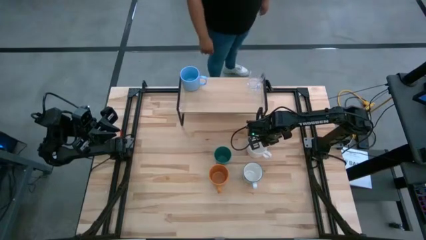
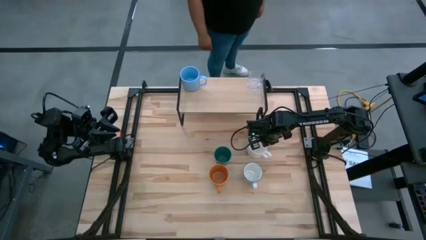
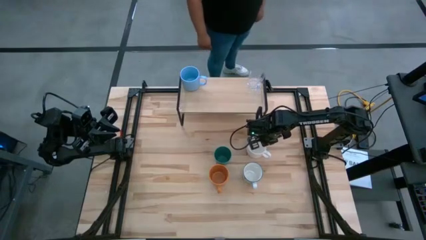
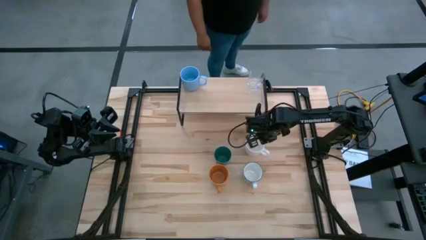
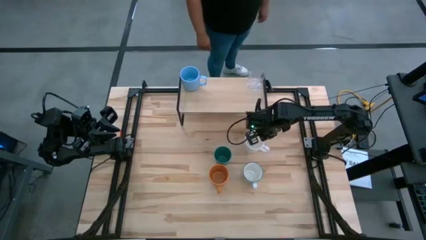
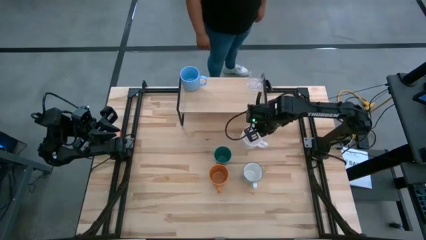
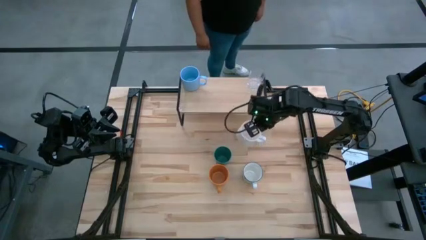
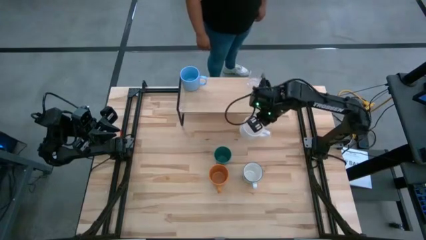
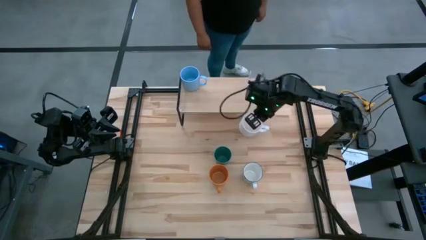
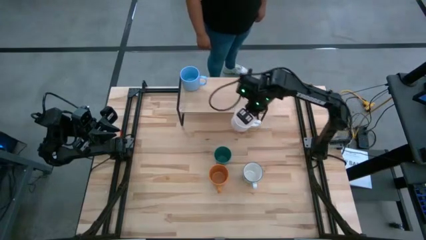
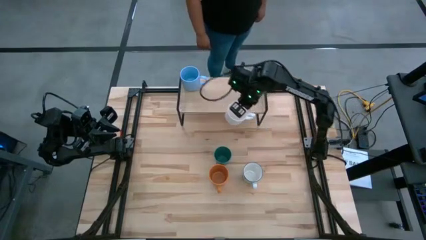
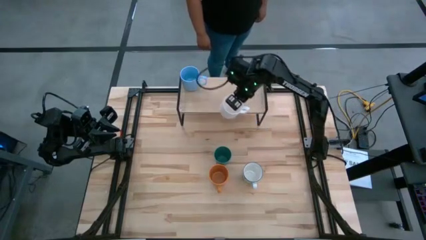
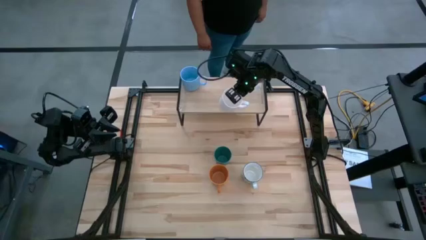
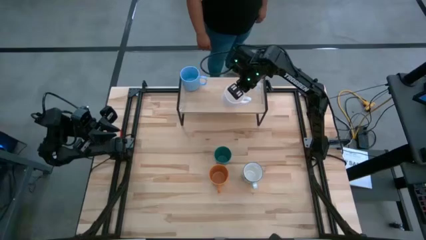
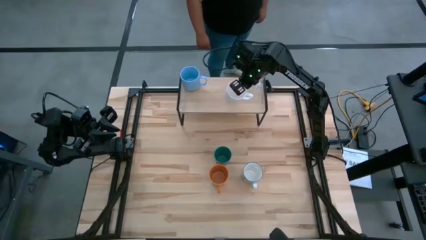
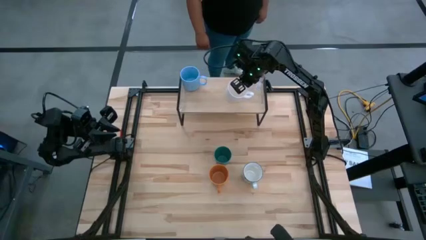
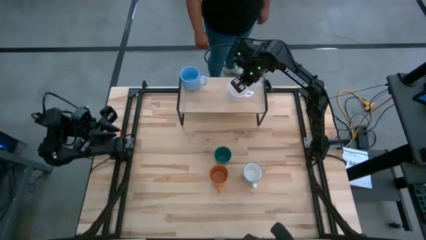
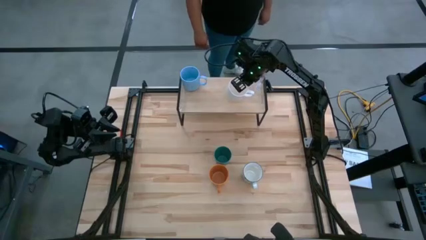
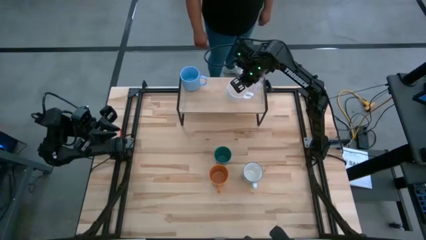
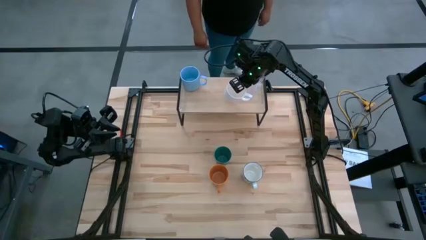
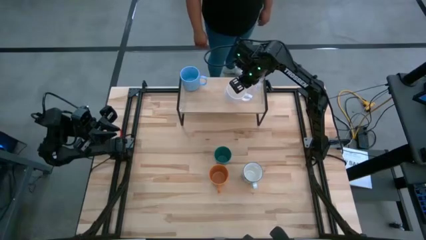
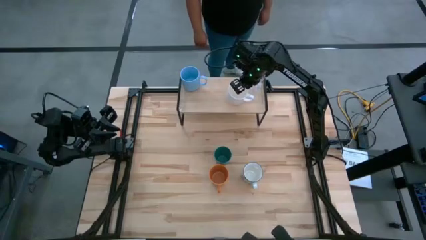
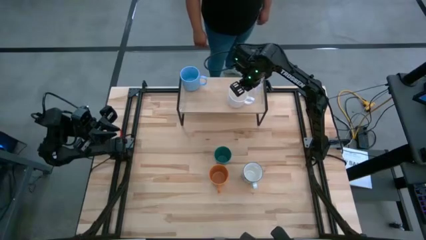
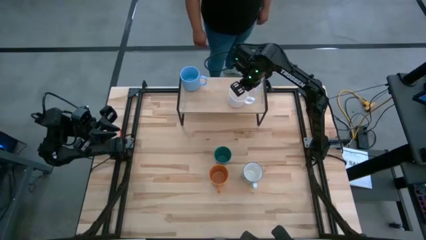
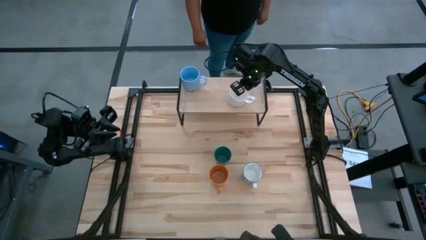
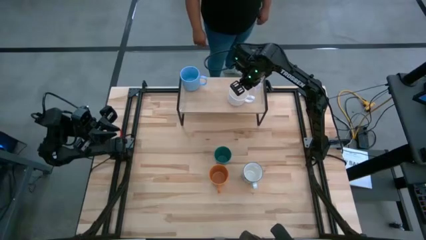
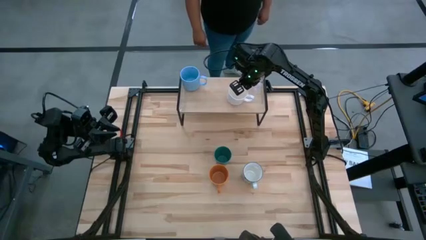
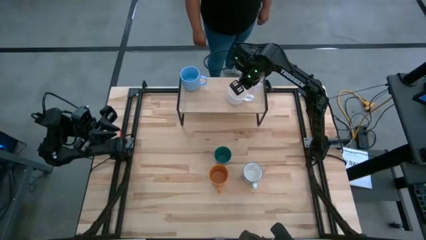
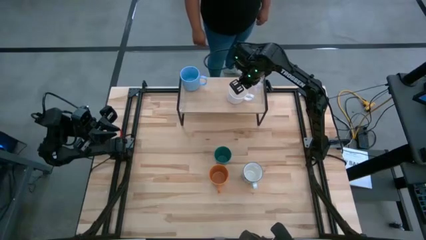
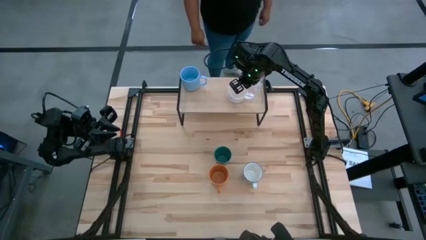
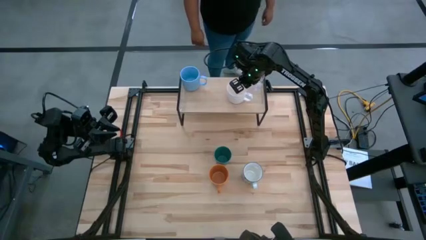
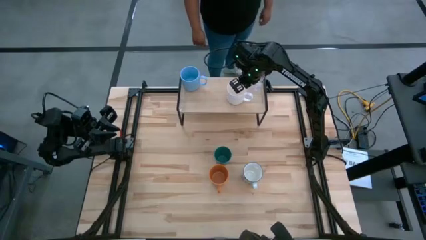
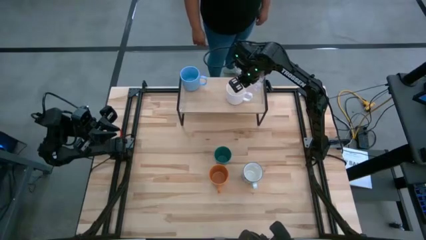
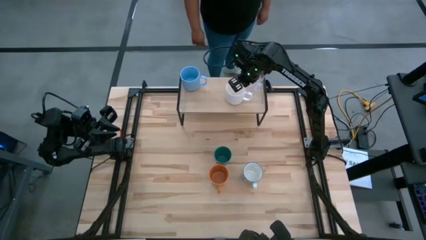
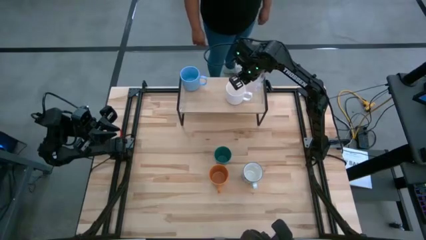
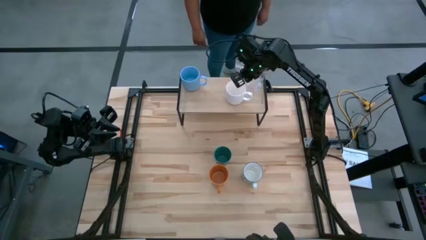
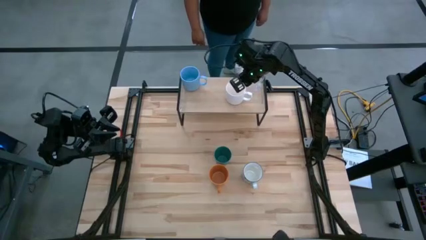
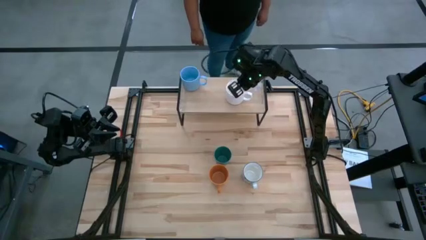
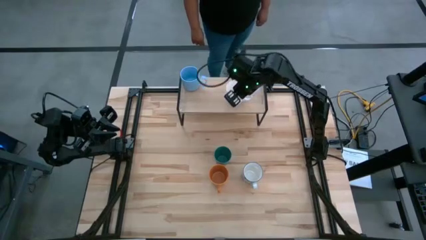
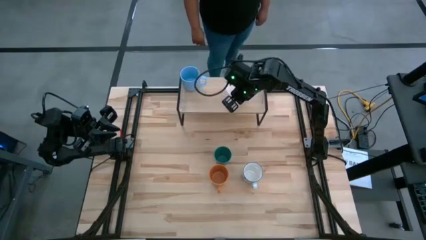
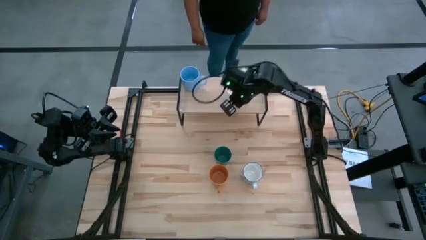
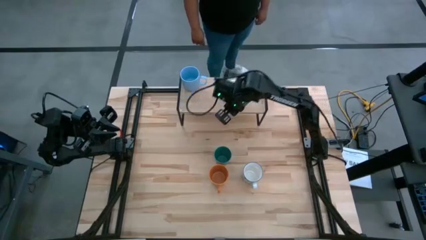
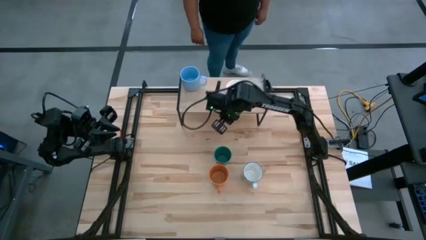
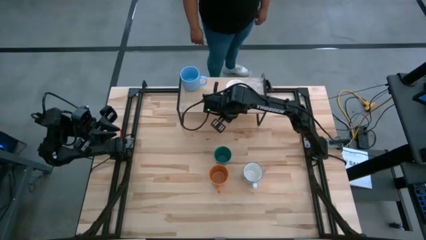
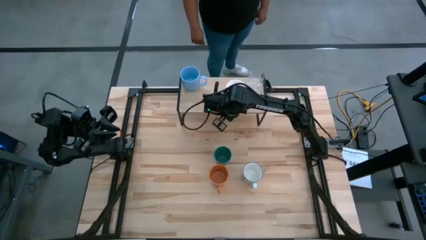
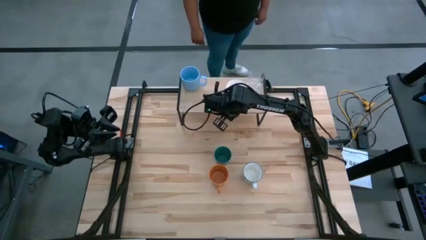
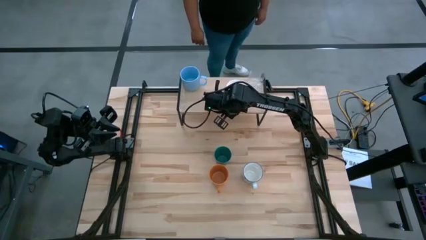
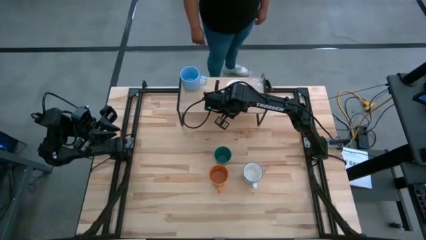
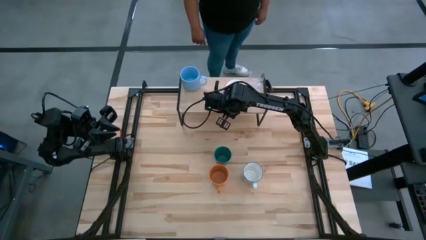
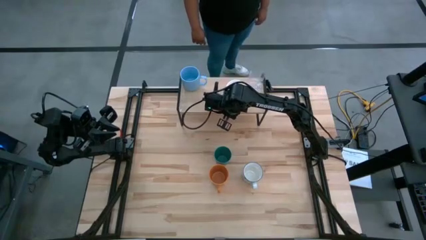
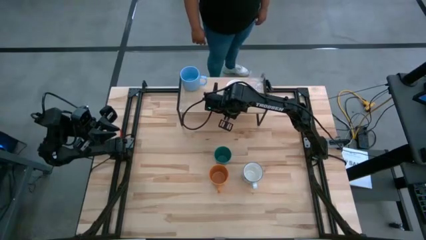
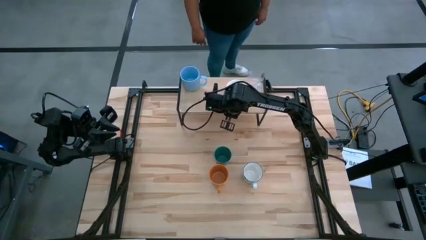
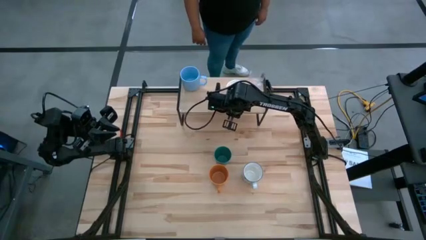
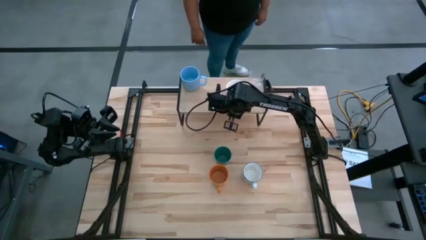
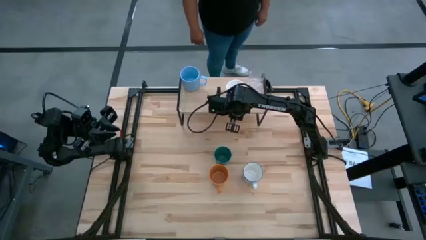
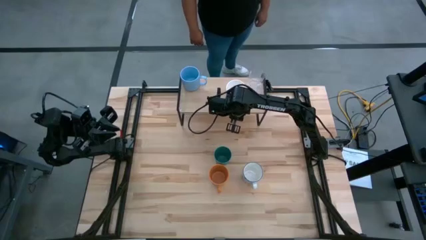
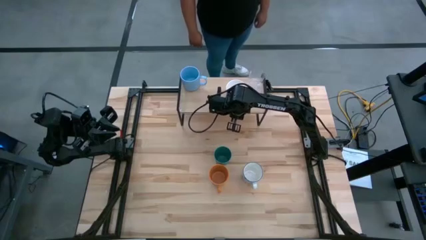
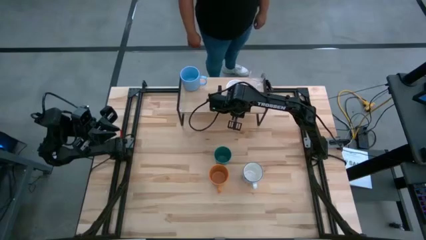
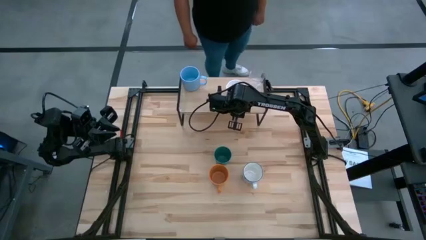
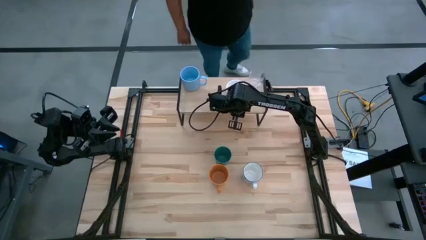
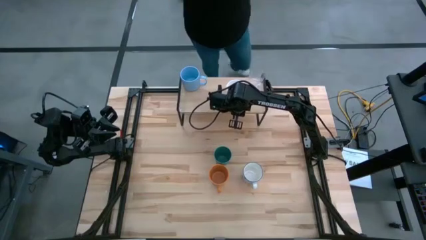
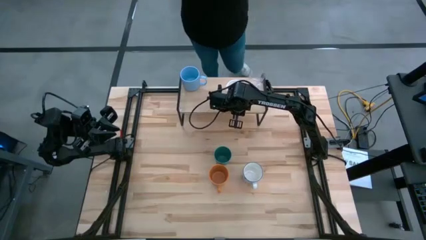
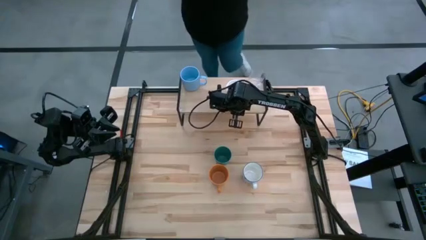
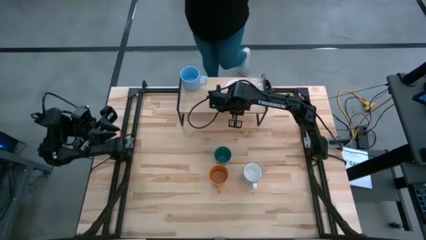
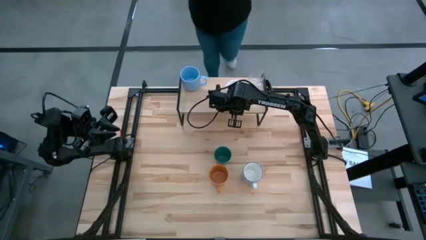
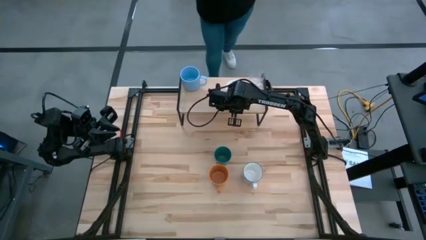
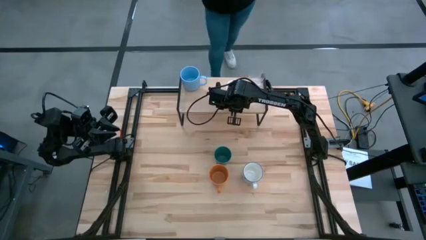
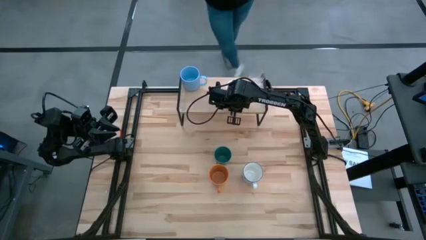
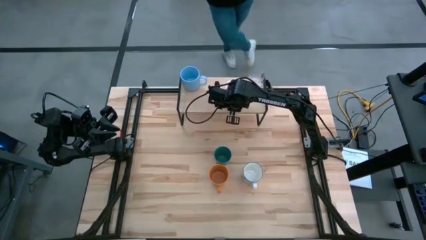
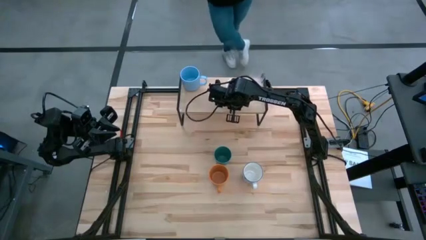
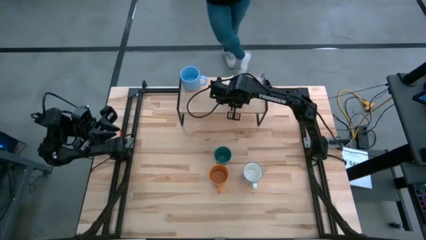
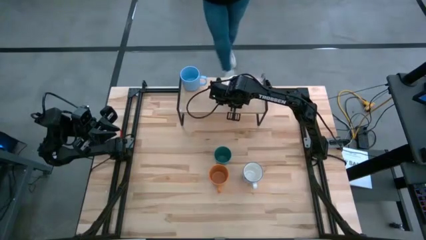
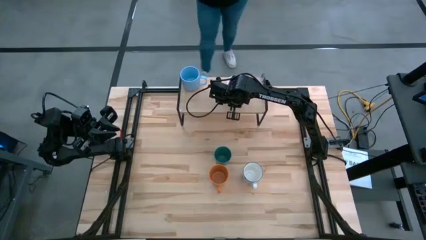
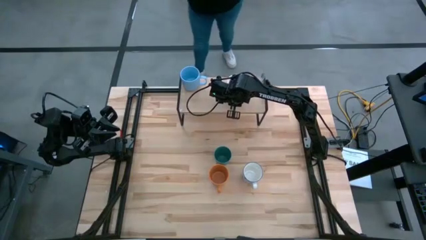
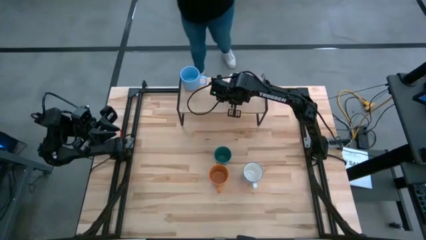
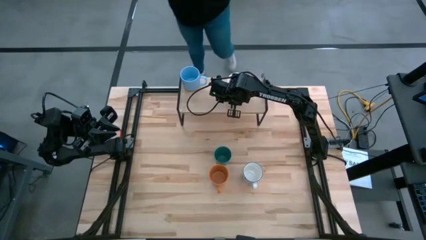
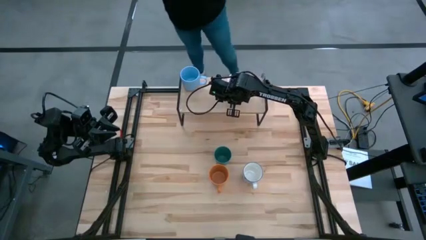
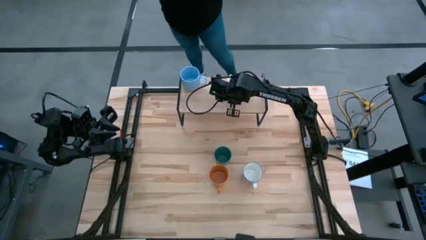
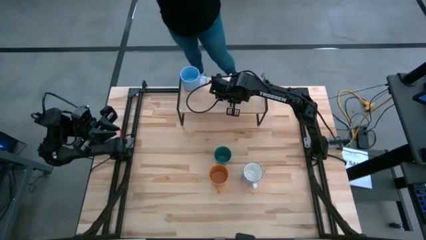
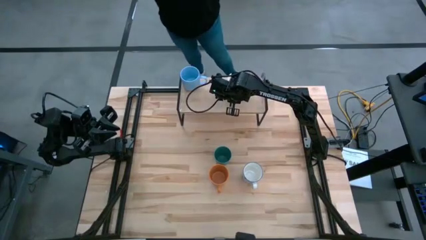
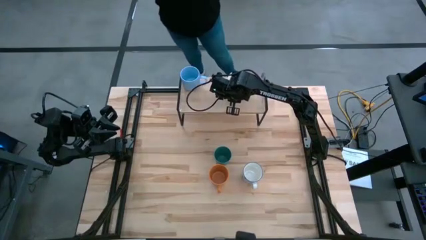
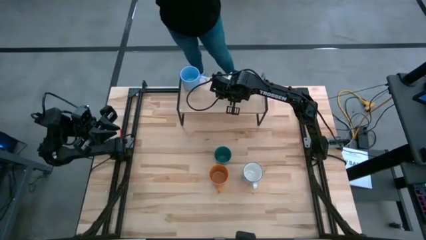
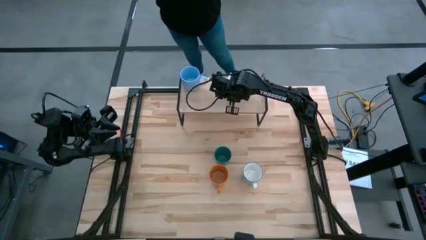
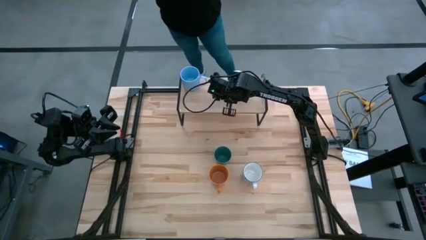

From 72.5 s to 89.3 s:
Task: Stack small to large cups/mugs on shelf
Put the white mug on the shelf
